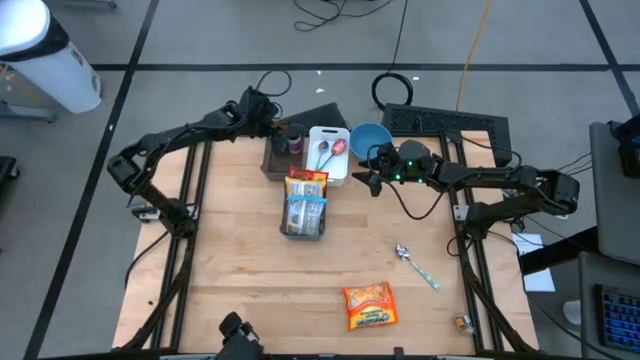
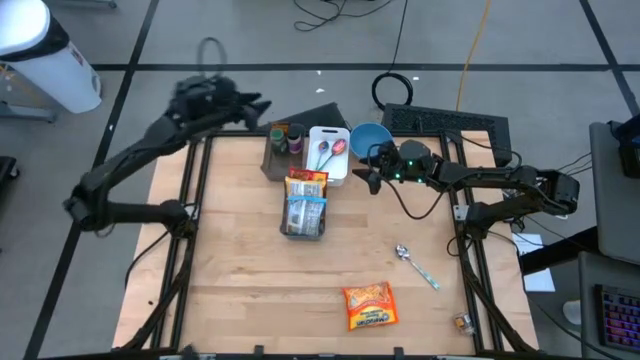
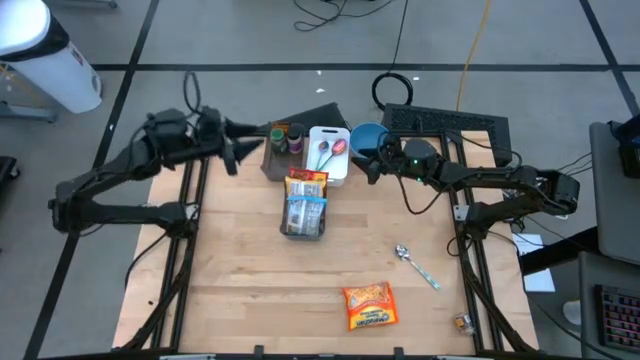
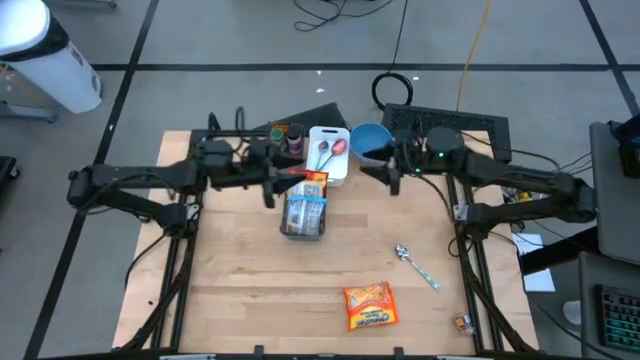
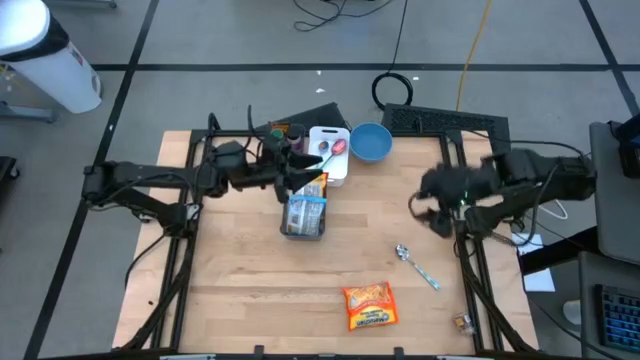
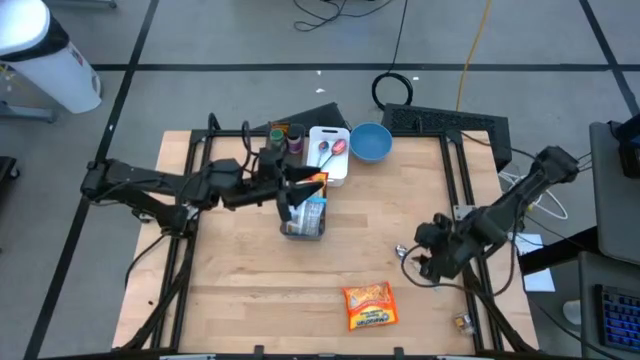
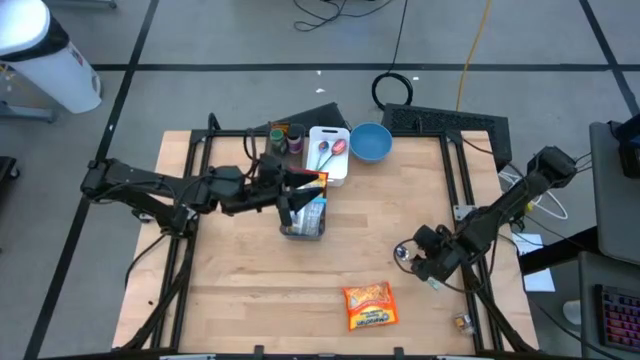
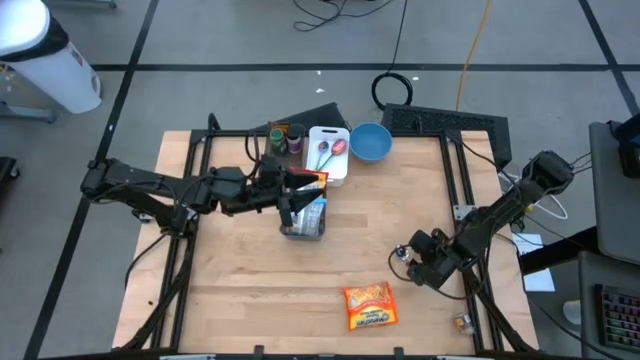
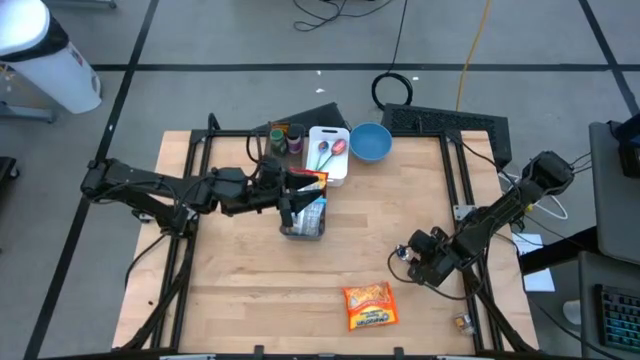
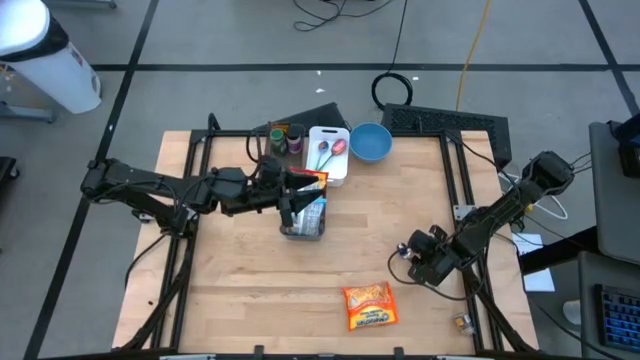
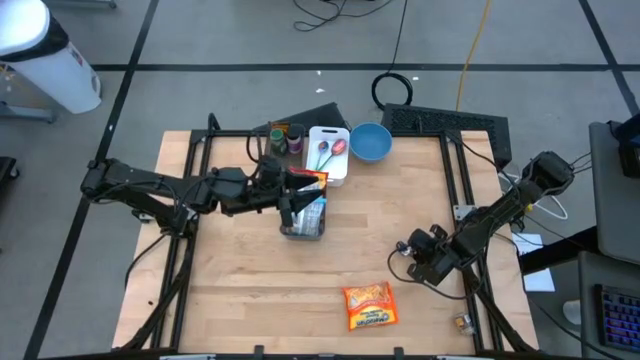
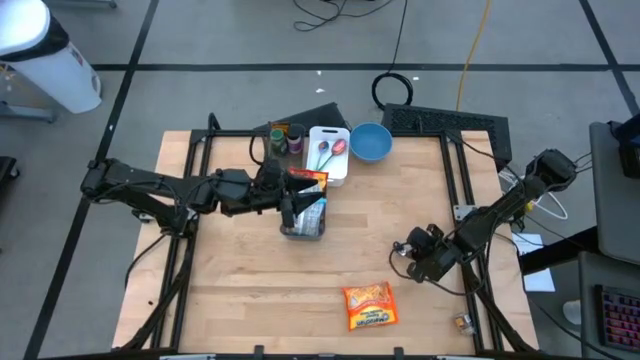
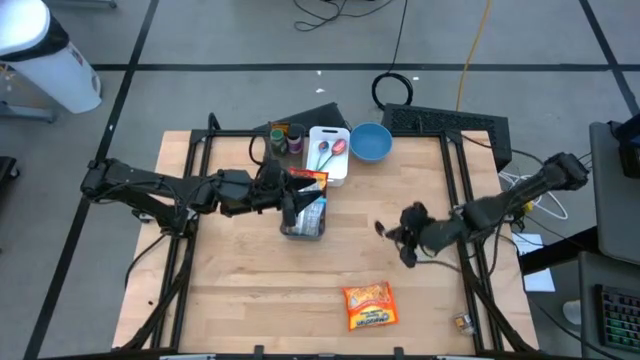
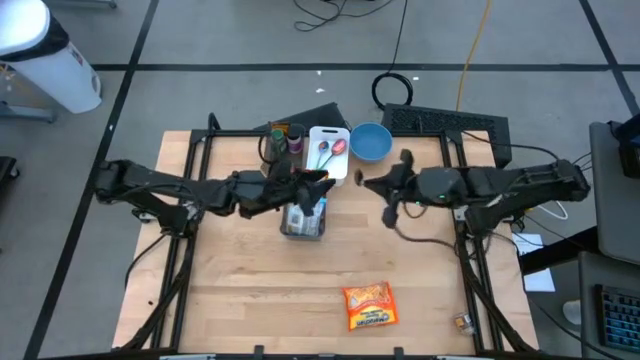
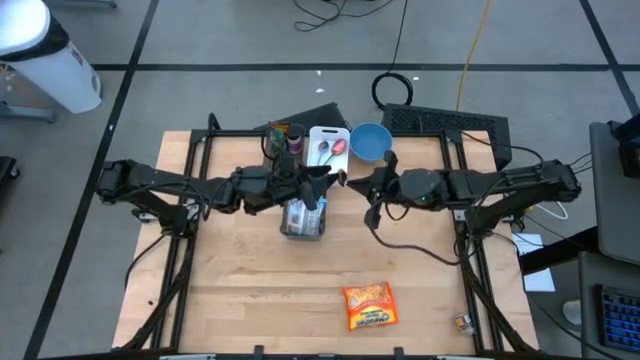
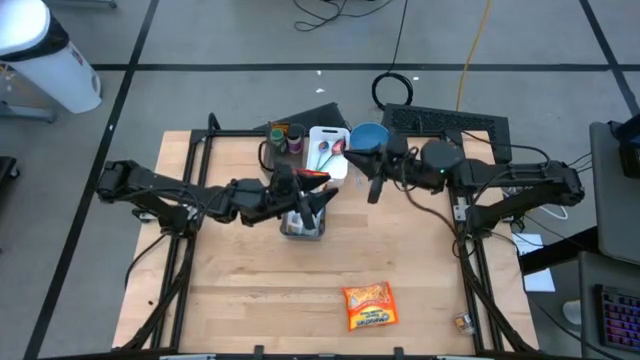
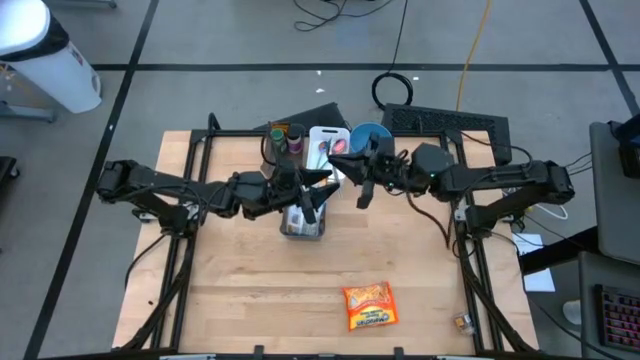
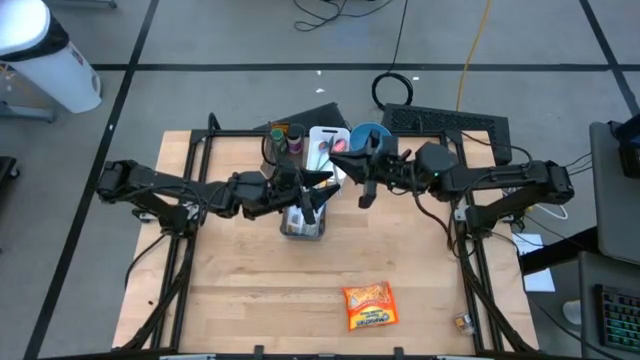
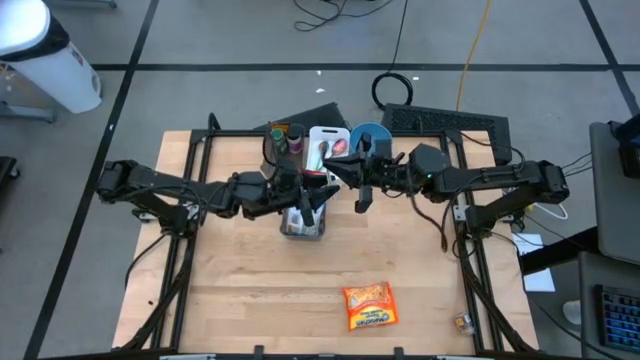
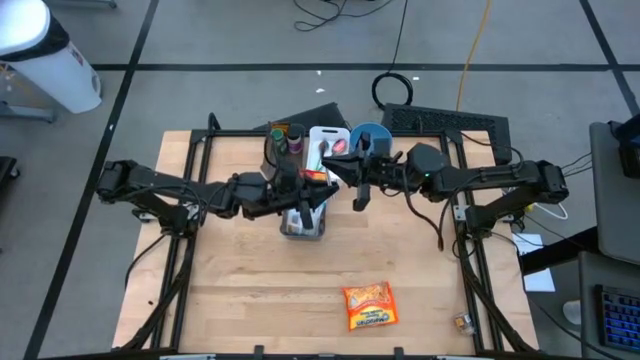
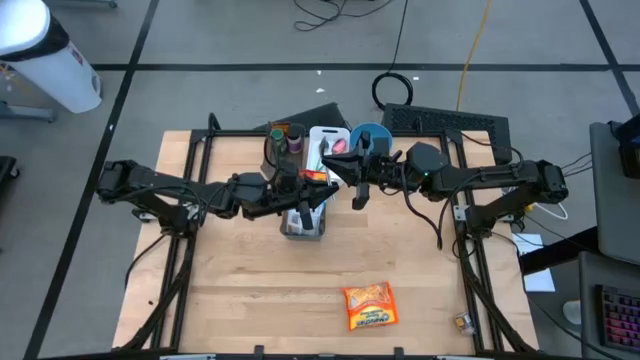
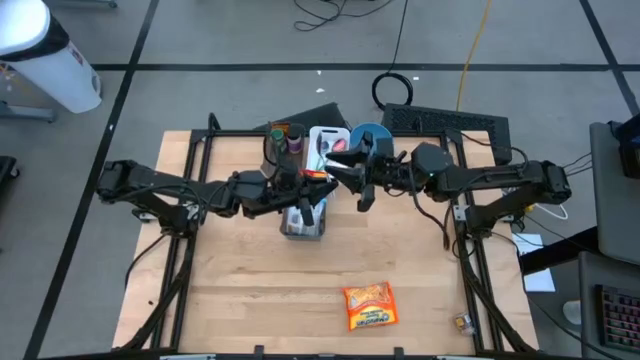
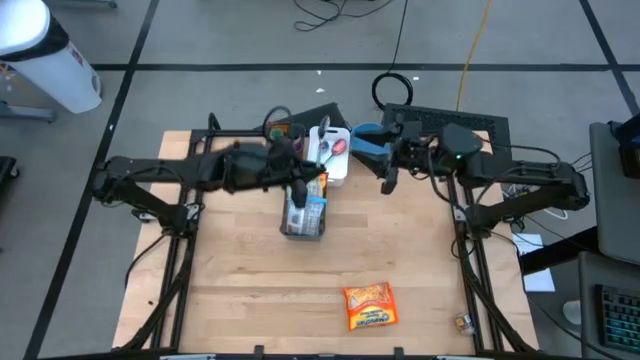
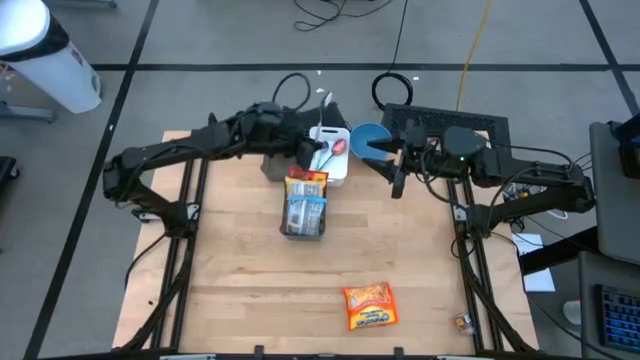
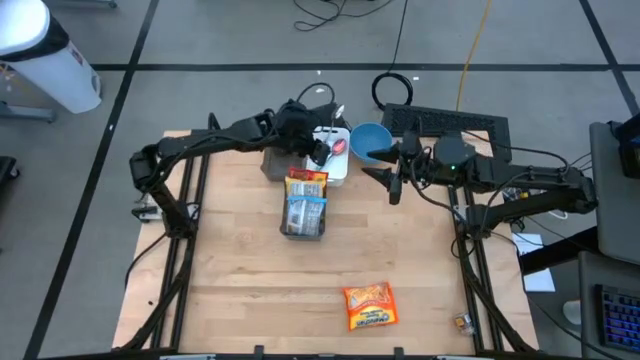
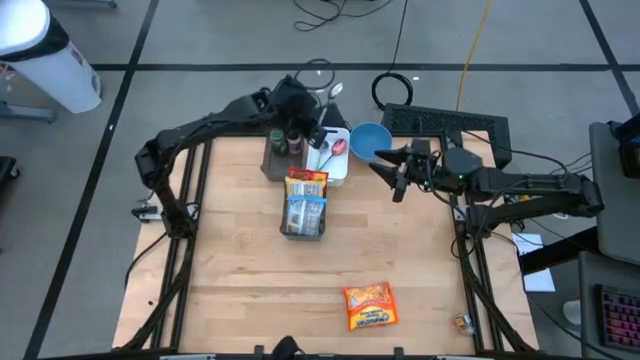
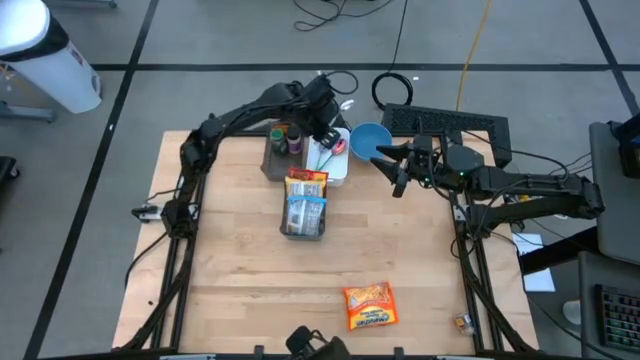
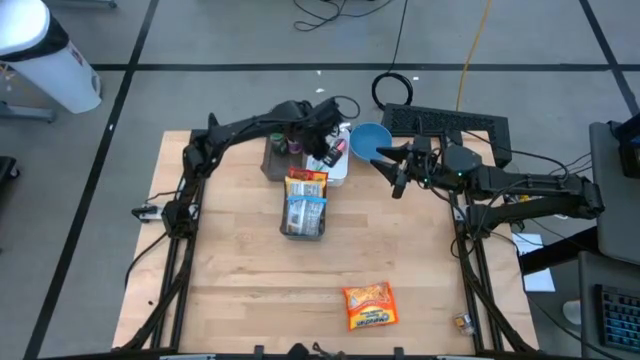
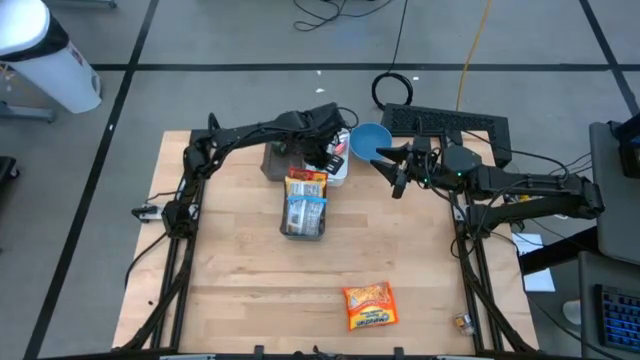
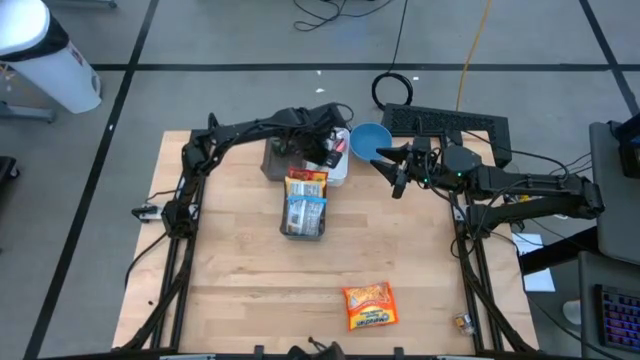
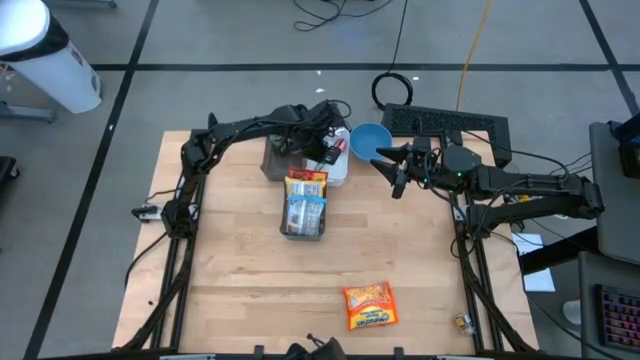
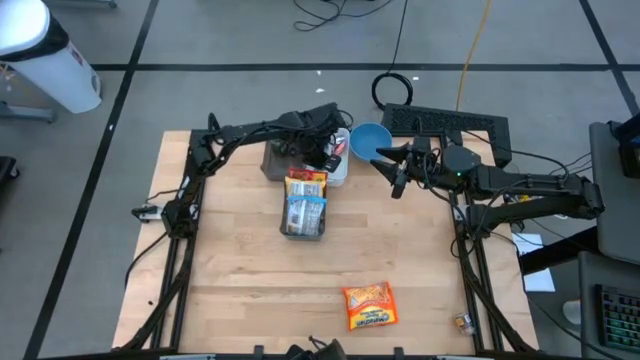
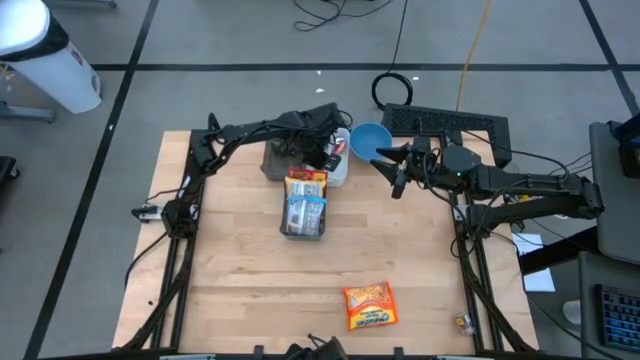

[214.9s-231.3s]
Task: Pick & Place Food Item
Put the green patterned spoon into the white bin

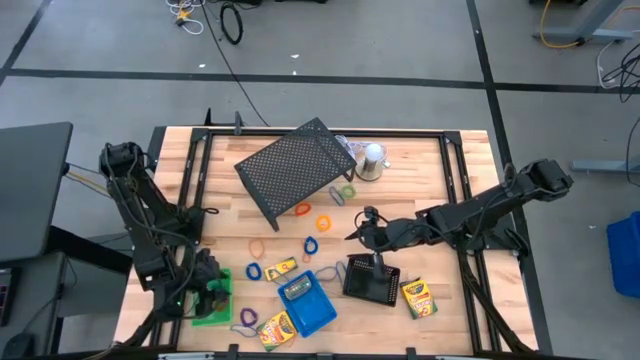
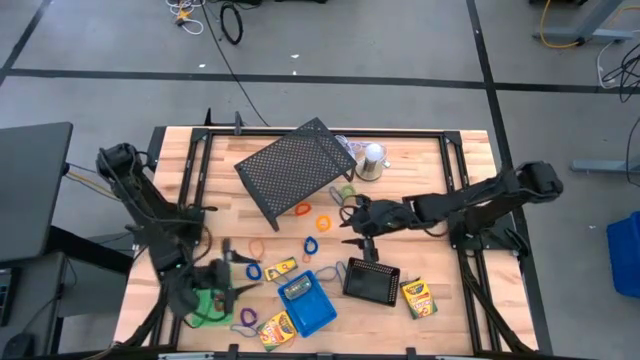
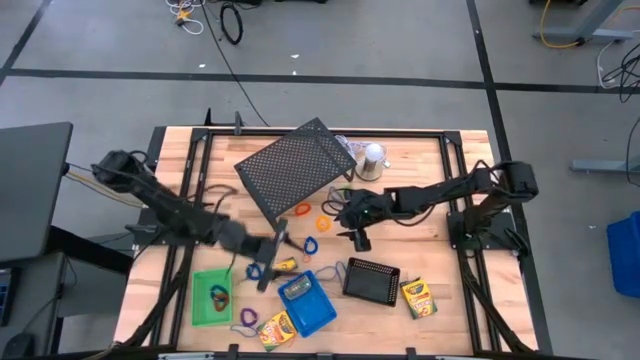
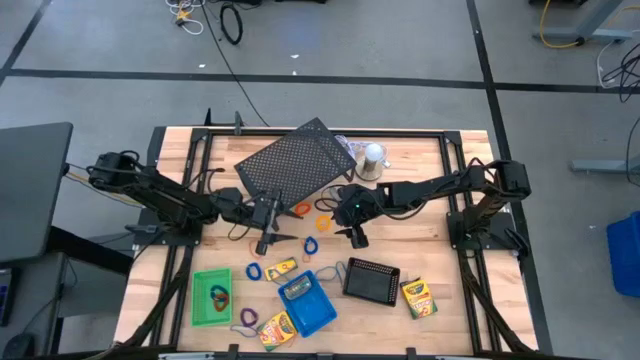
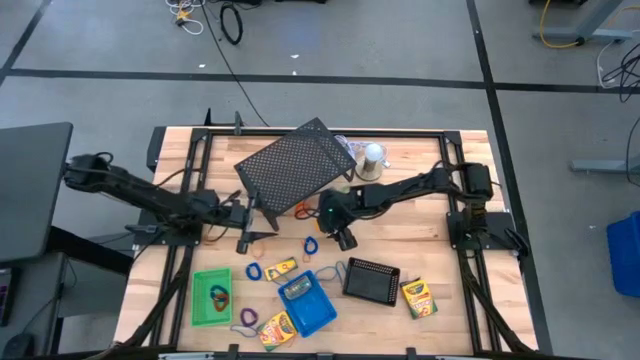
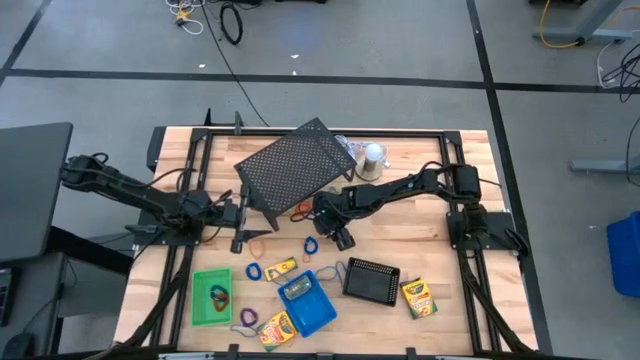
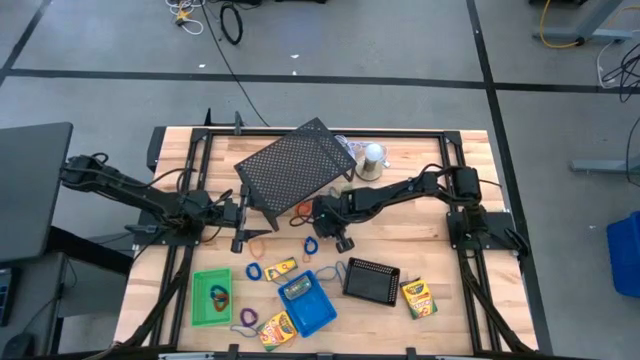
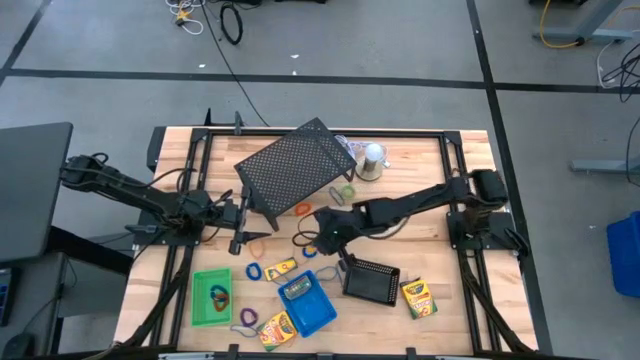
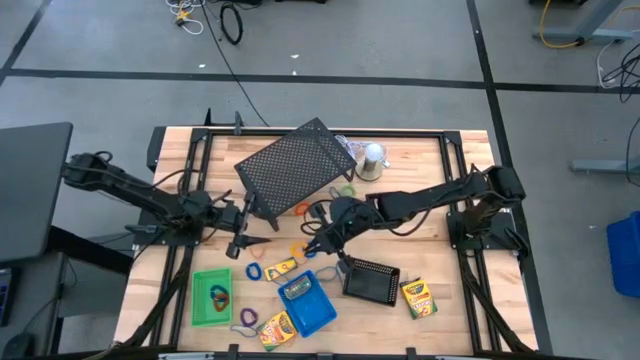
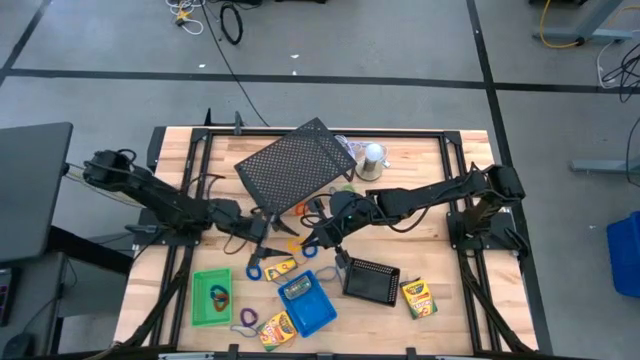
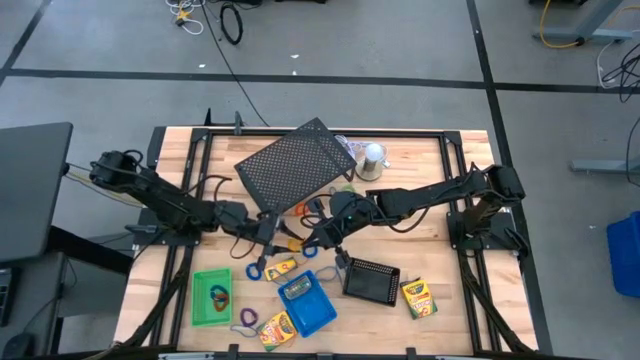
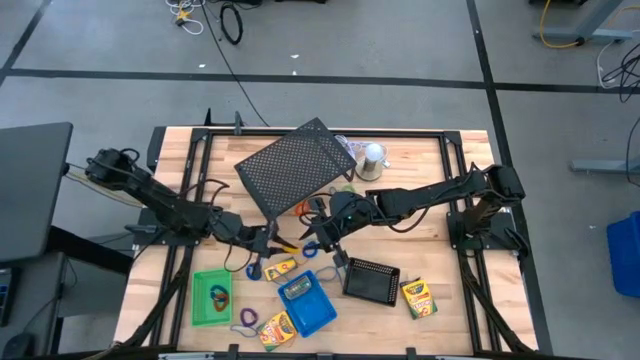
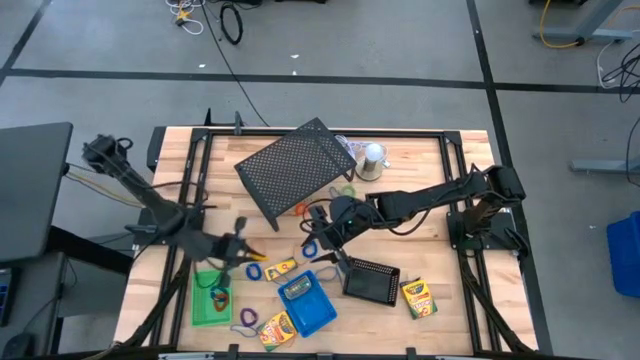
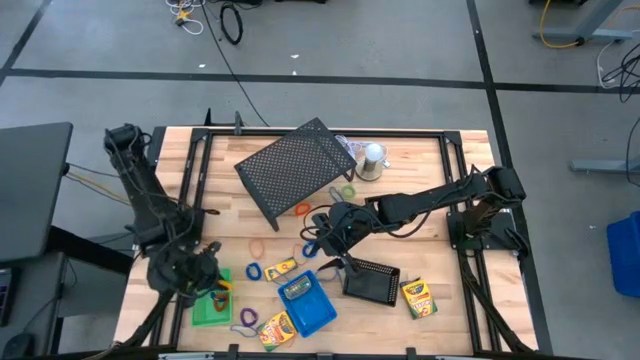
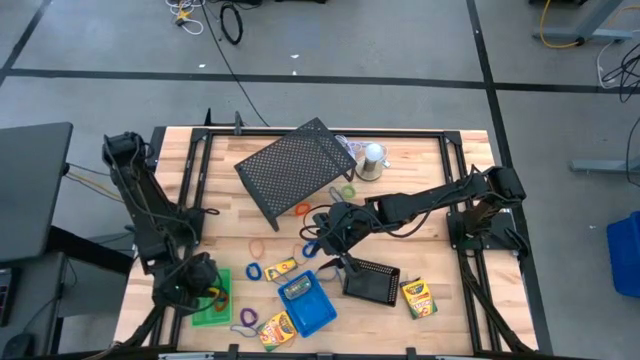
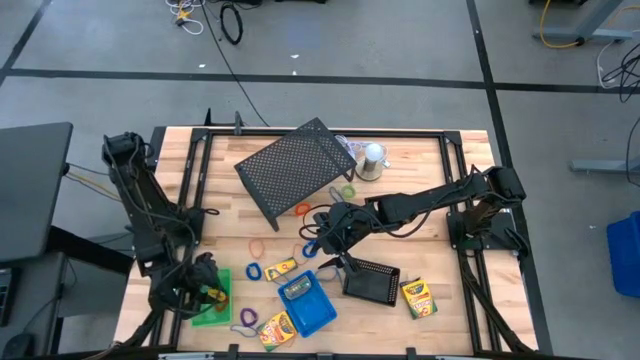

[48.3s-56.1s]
Task: Pick & Place Office Desk Supplies
Put the yellow spiral keychain into the green bin
